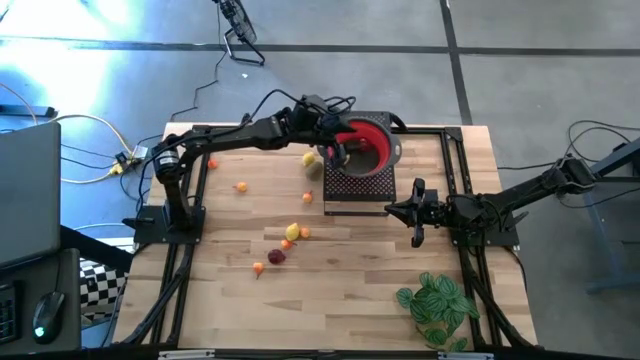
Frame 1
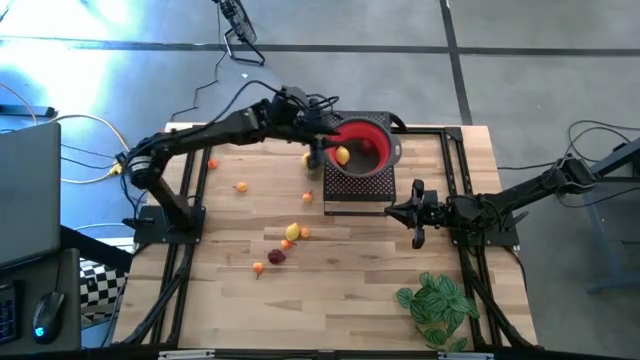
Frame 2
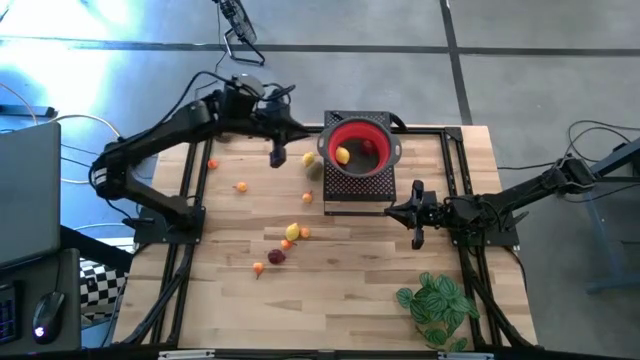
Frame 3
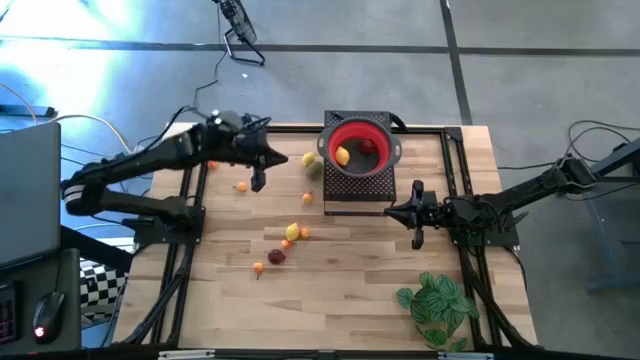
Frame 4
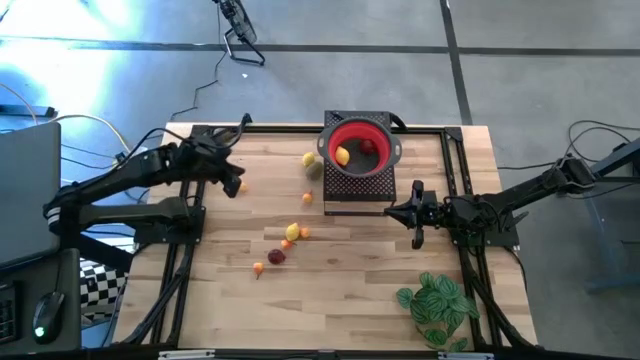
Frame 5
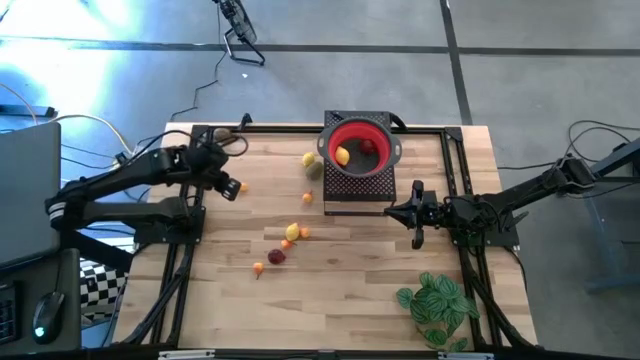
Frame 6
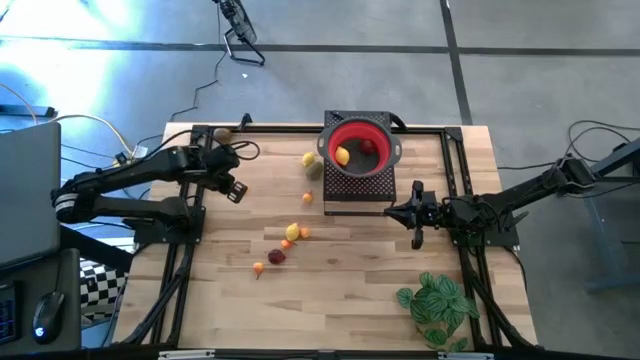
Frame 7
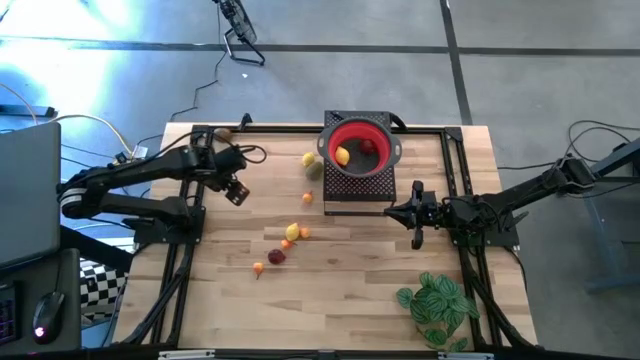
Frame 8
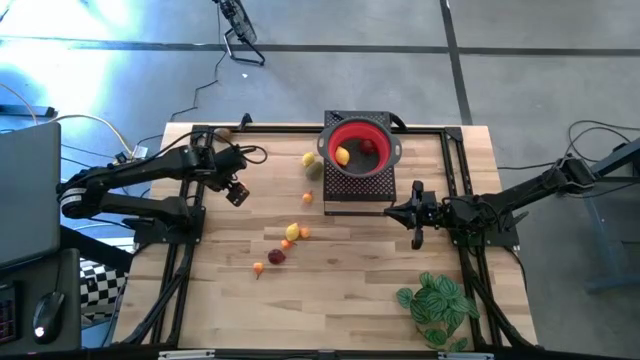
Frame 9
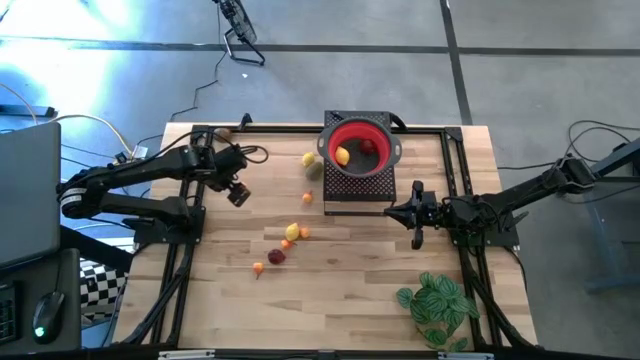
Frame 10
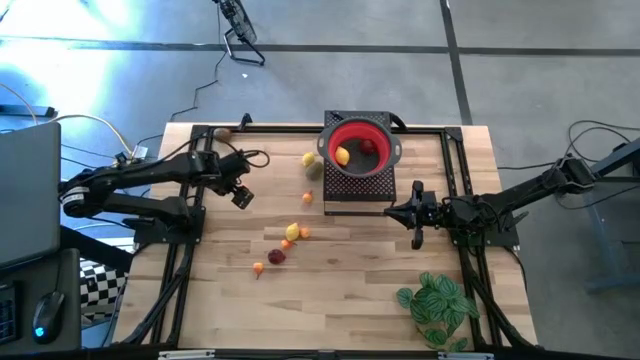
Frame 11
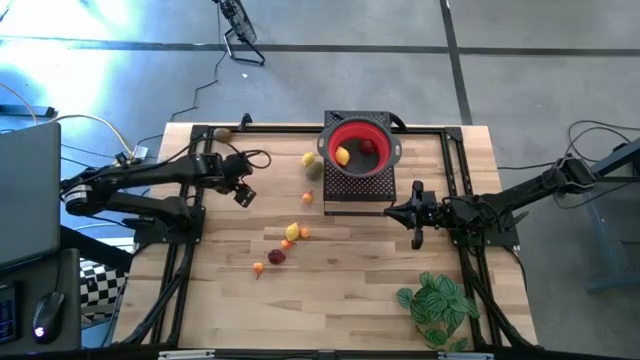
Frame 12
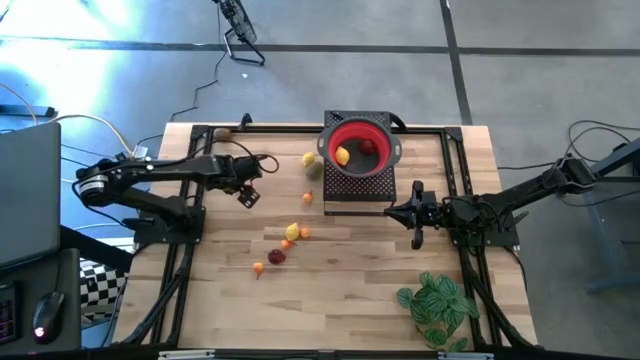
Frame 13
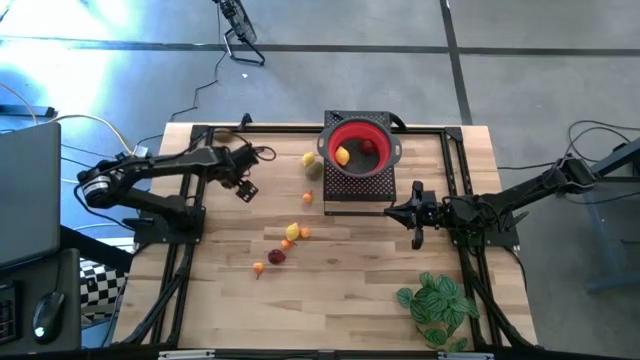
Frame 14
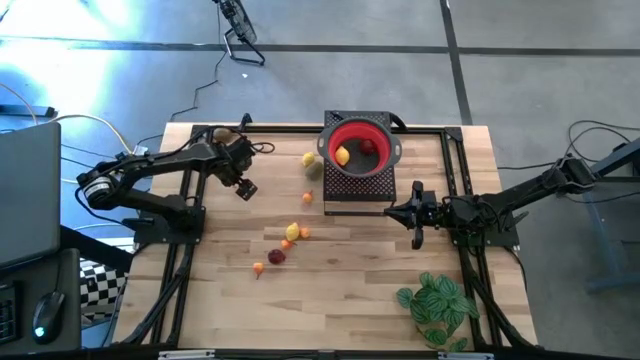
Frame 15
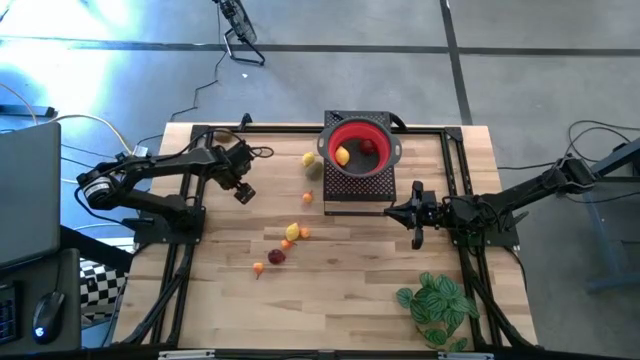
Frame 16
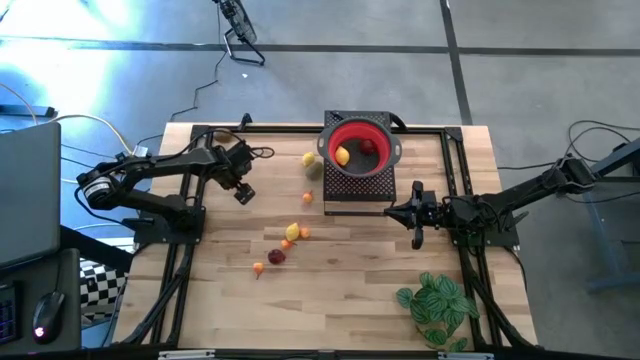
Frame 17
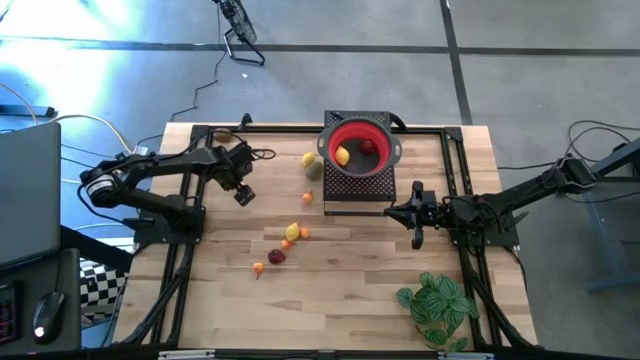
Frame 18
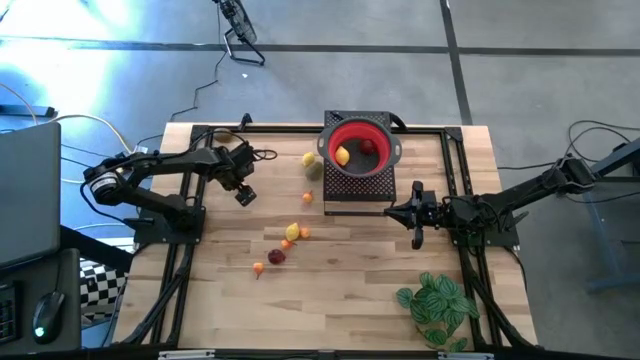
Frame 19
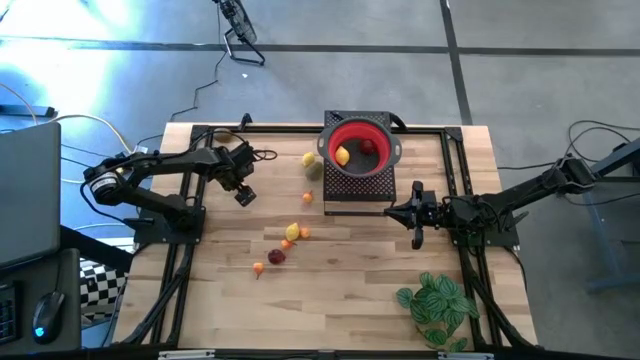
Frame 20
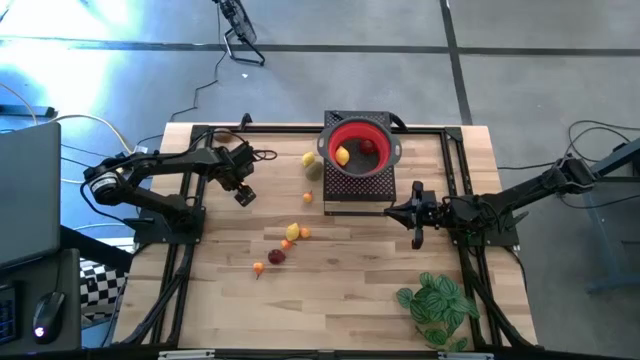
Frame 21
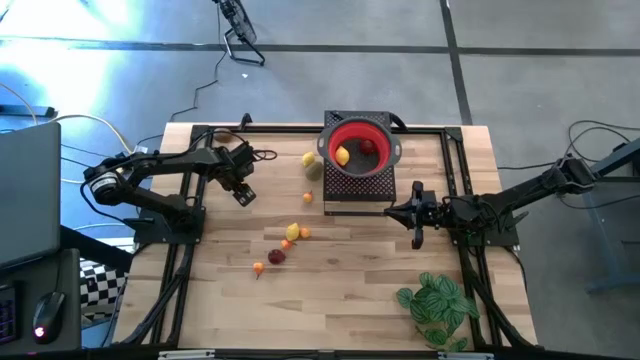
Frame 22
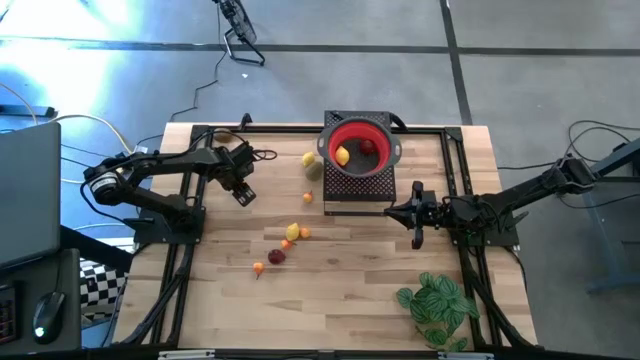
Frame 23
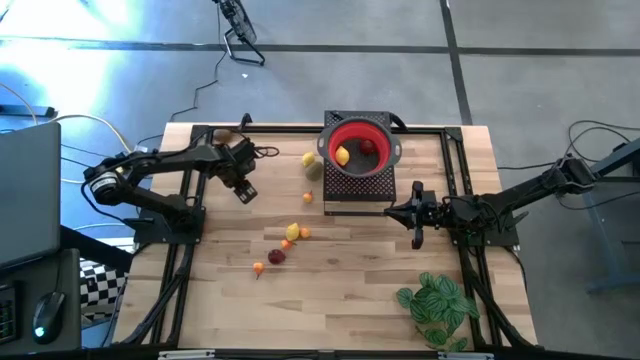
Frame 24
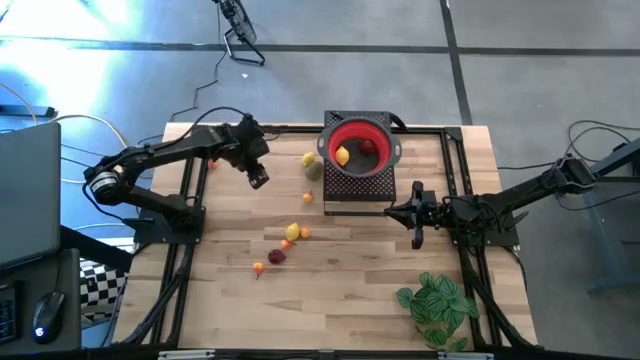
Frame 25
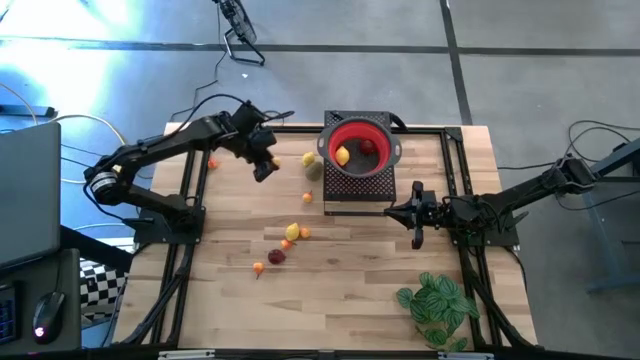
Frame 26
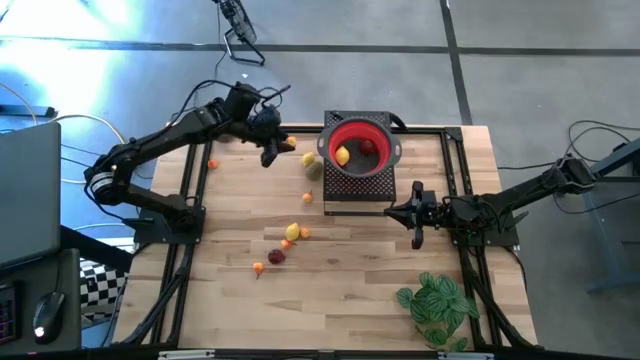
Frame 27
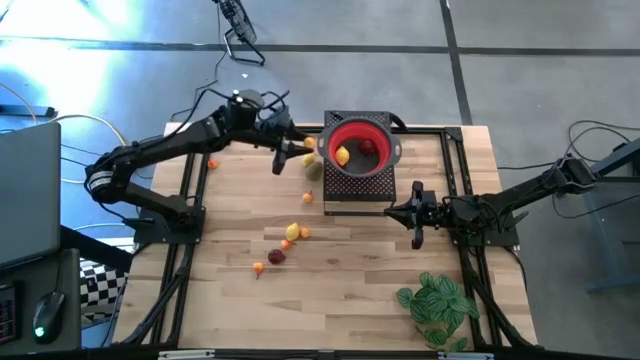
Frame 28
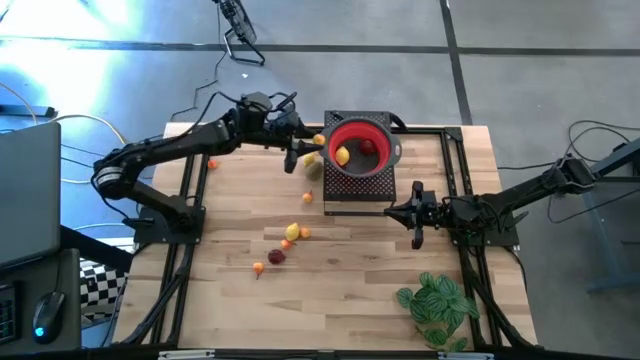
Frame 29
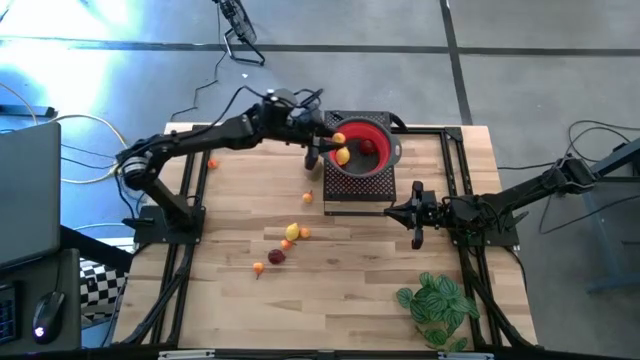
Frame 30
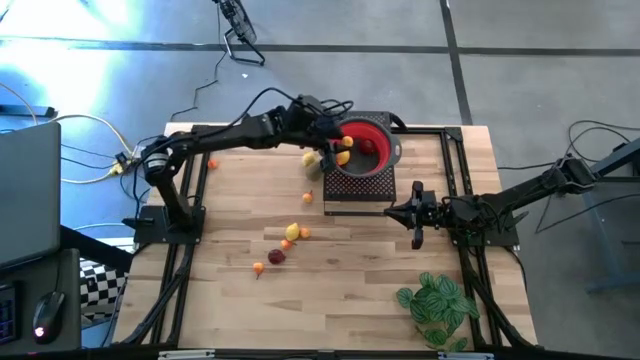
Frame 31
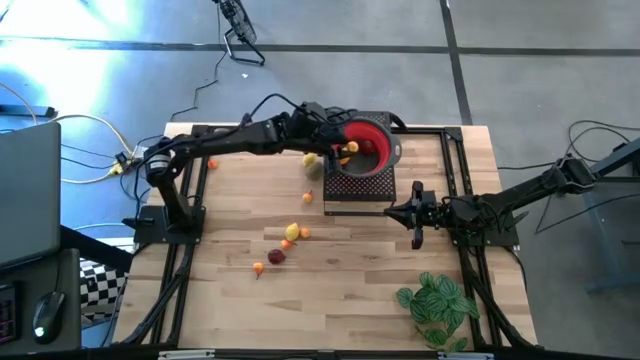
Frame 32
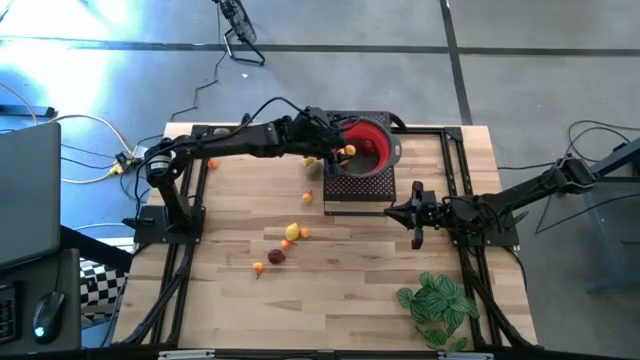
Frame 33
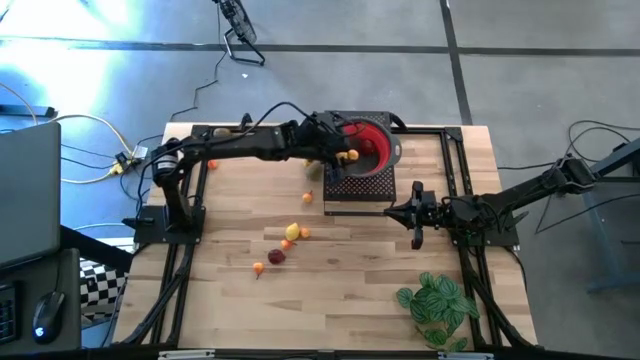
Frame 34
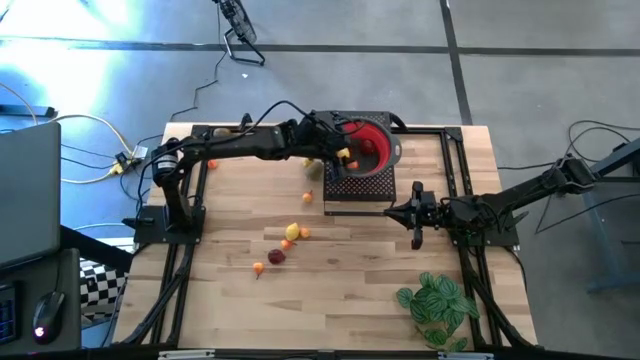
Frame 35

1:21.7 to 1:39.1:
Task: Pick & Place Fruit
Put the orange pear into the red strainer bowl on the shelf

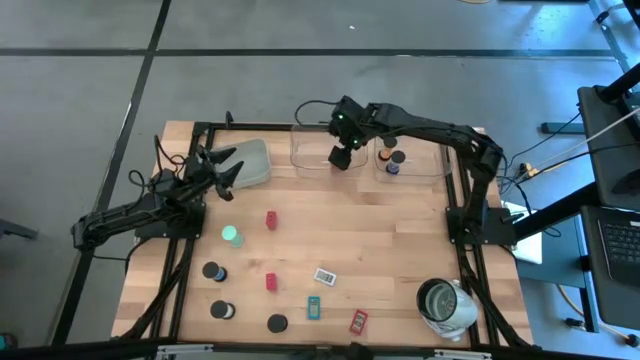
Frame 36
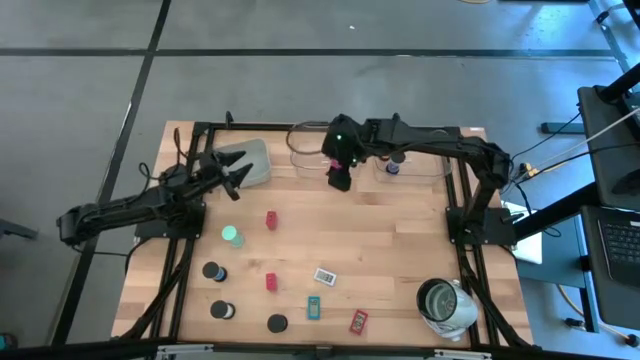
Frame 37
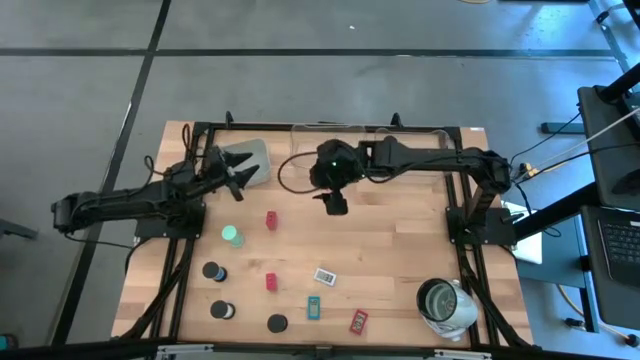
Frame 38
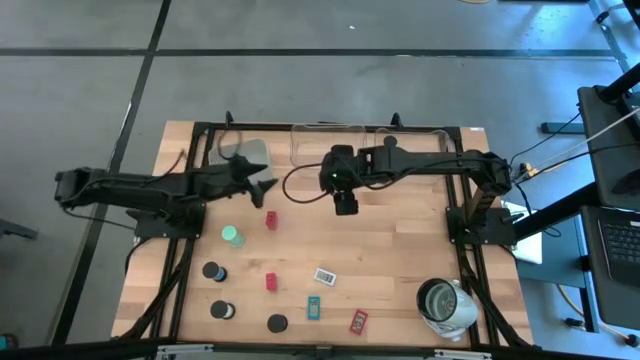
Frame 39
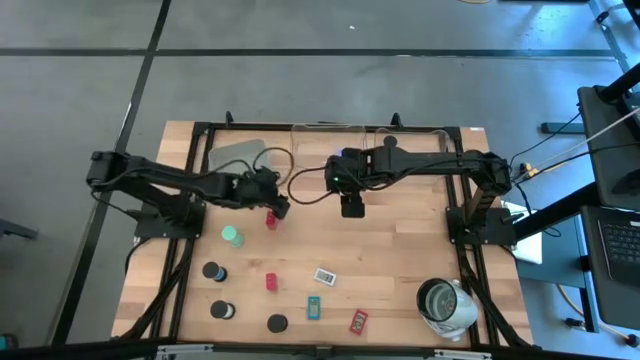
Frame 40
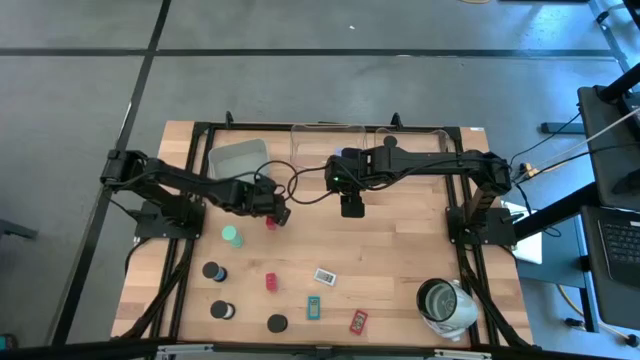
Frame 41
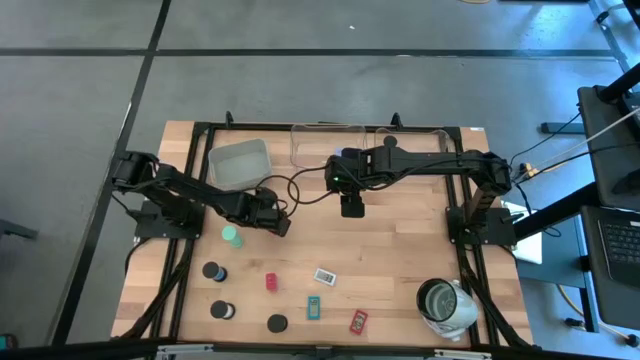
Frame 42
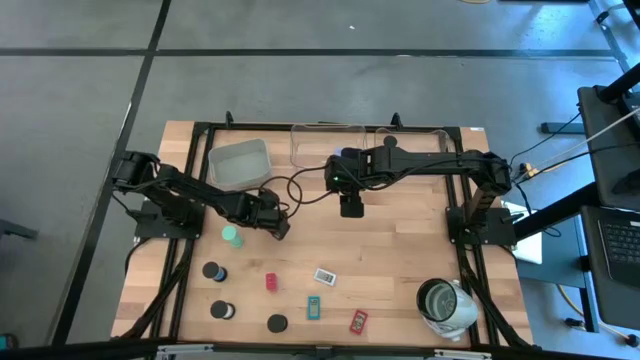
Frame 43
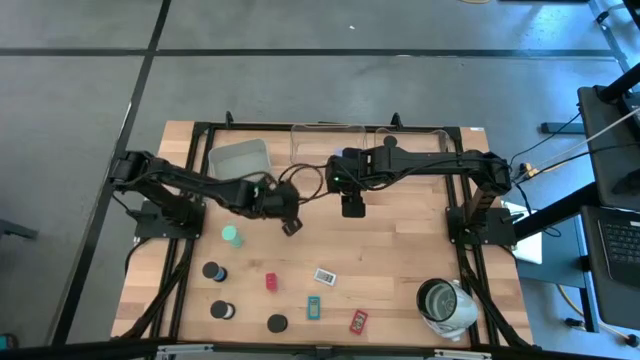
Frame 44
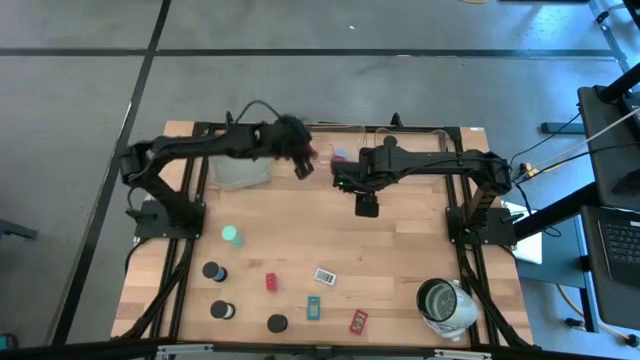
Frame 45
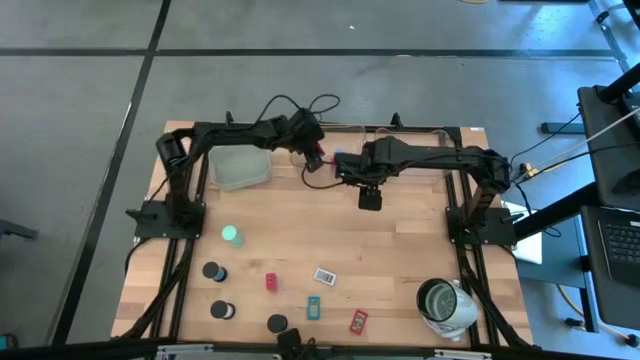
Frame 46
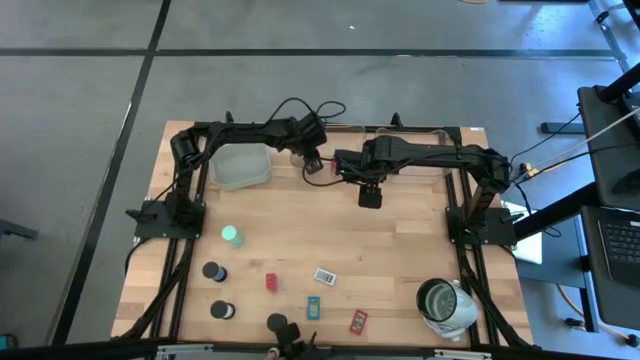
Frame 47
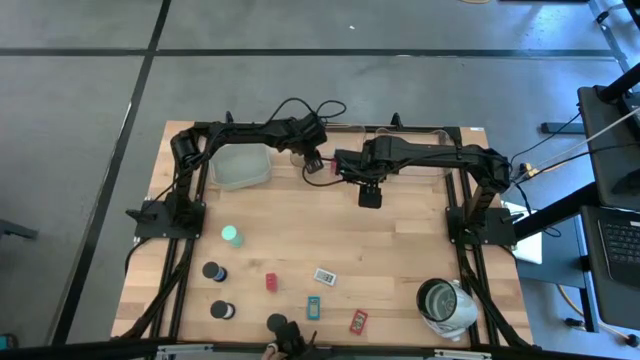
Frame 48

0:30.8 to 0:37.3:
Task: Pick & Place Office items
Put the top red adapter into the left transparent bin
